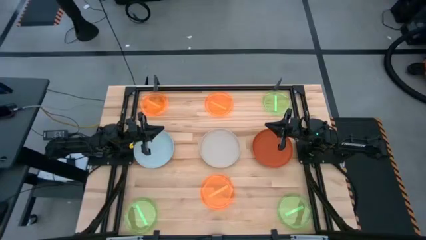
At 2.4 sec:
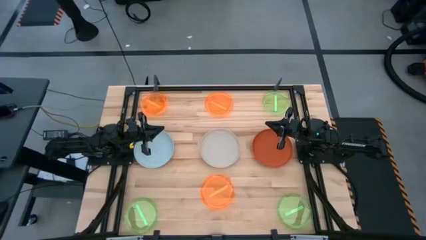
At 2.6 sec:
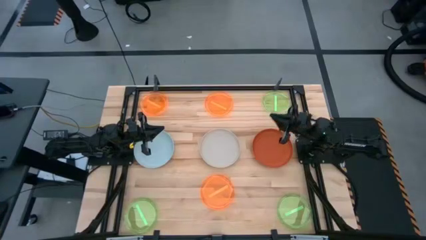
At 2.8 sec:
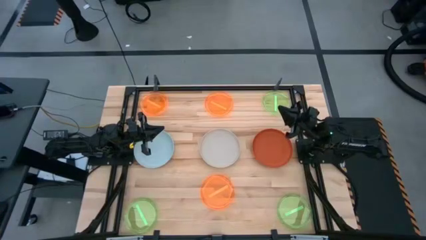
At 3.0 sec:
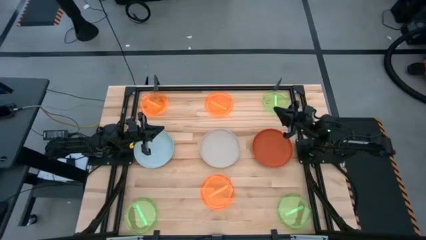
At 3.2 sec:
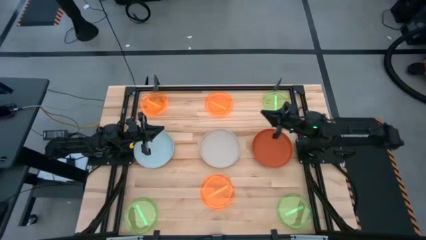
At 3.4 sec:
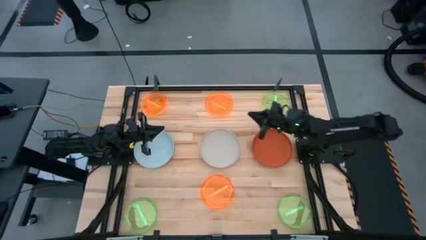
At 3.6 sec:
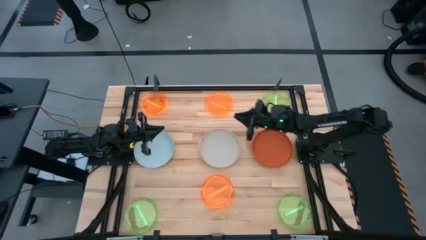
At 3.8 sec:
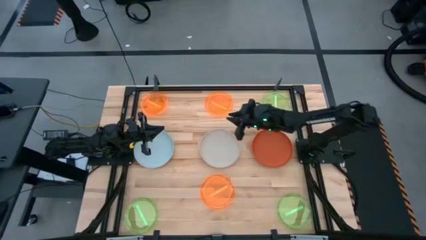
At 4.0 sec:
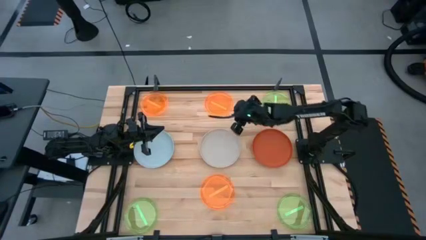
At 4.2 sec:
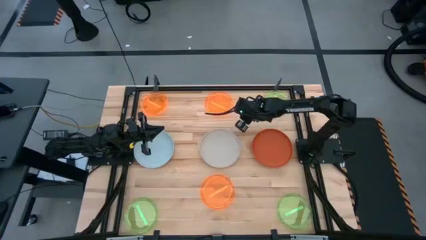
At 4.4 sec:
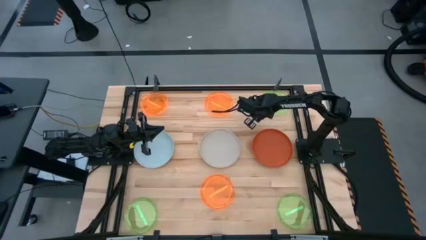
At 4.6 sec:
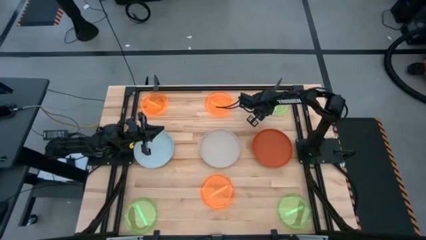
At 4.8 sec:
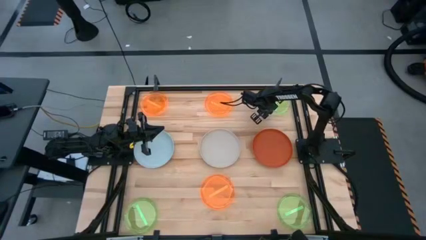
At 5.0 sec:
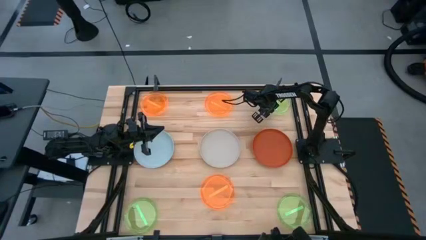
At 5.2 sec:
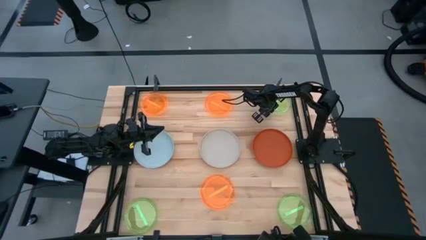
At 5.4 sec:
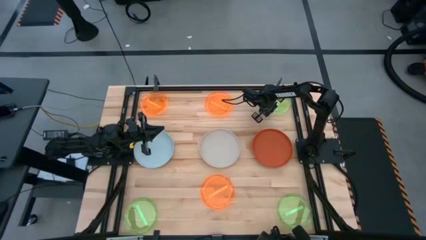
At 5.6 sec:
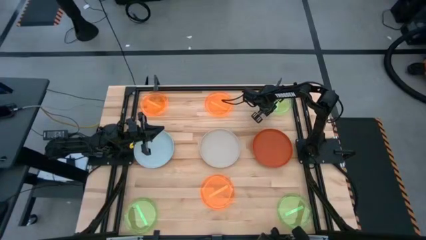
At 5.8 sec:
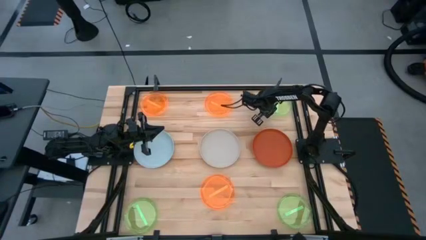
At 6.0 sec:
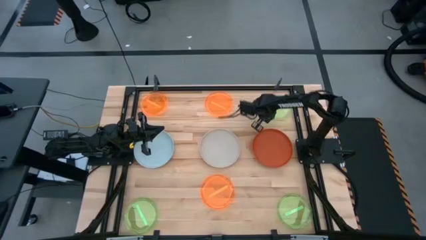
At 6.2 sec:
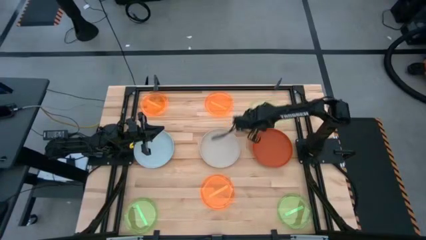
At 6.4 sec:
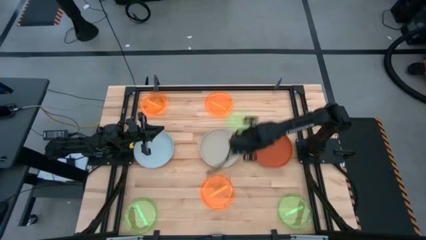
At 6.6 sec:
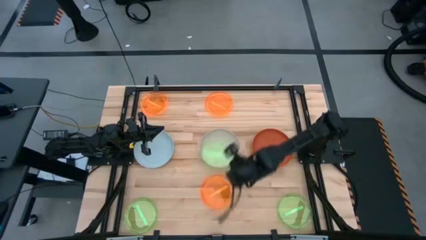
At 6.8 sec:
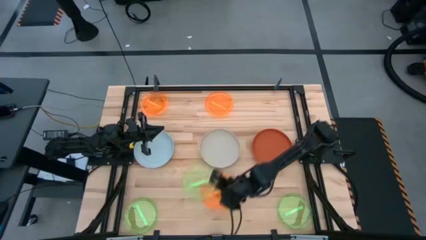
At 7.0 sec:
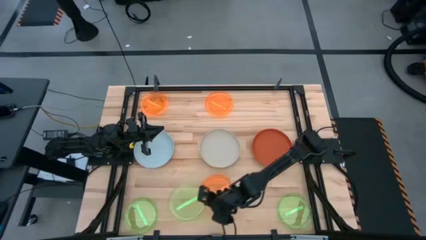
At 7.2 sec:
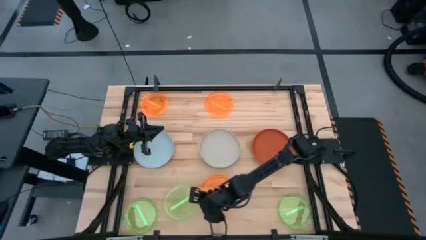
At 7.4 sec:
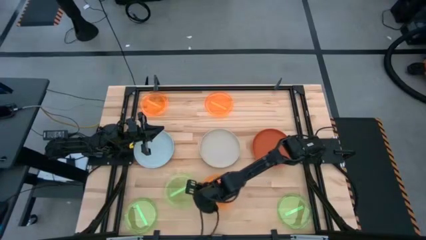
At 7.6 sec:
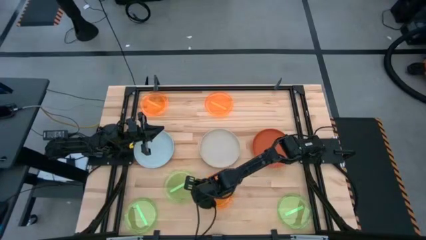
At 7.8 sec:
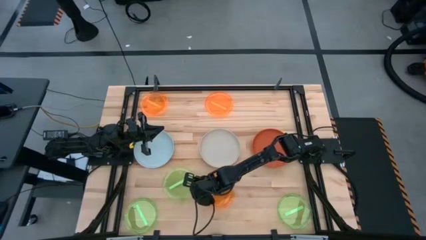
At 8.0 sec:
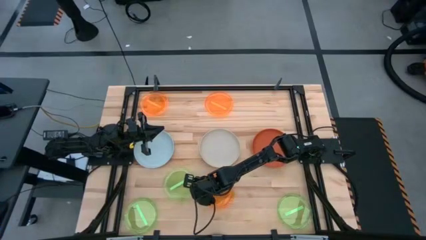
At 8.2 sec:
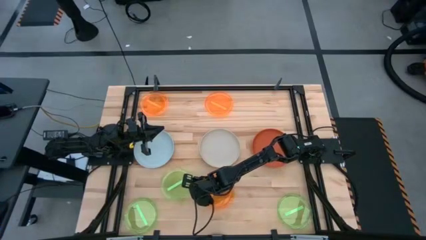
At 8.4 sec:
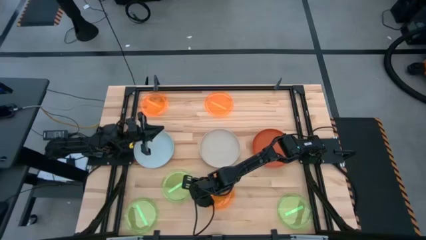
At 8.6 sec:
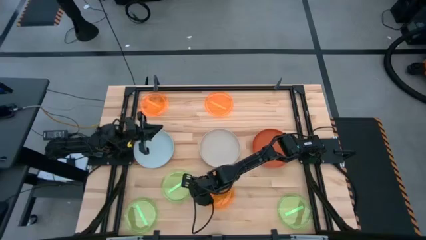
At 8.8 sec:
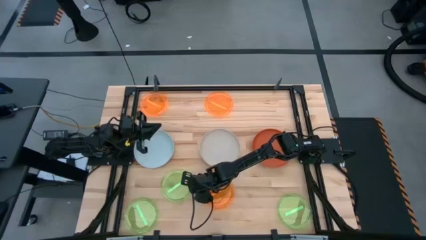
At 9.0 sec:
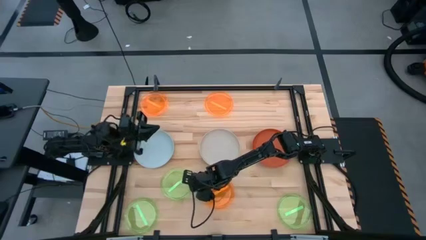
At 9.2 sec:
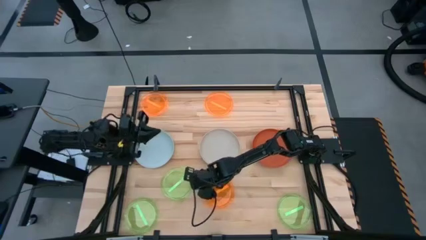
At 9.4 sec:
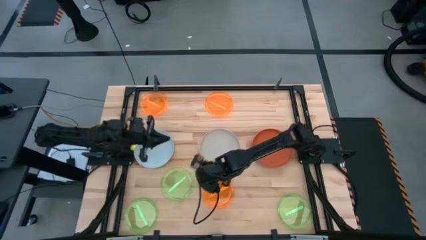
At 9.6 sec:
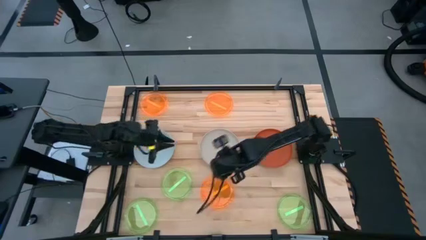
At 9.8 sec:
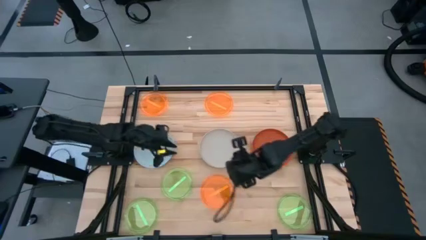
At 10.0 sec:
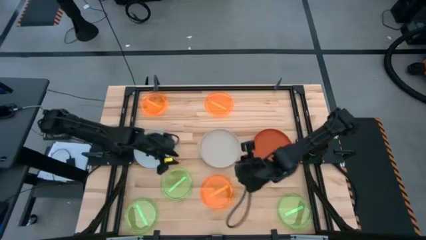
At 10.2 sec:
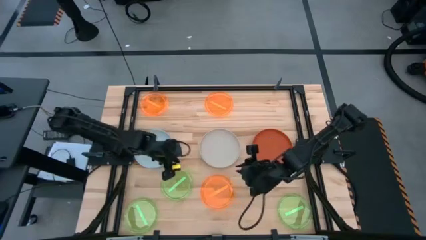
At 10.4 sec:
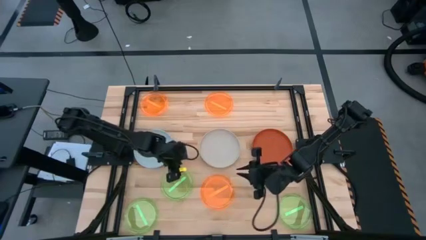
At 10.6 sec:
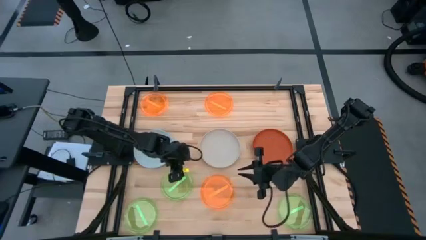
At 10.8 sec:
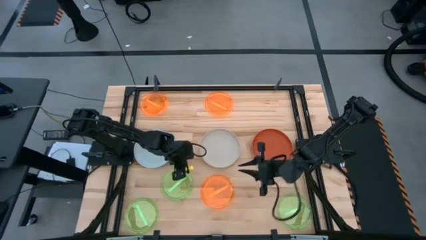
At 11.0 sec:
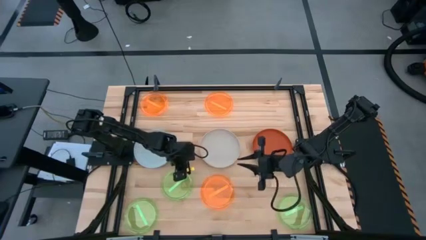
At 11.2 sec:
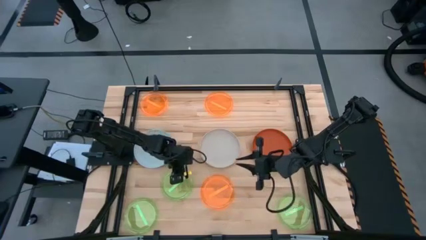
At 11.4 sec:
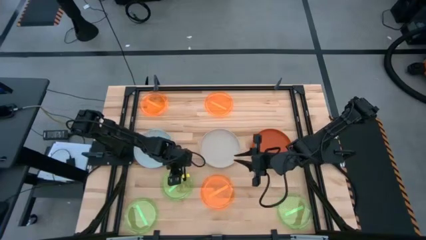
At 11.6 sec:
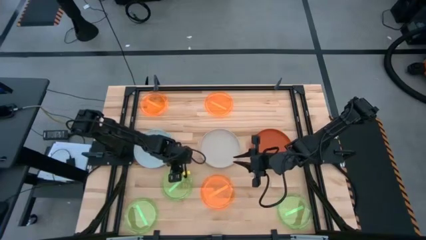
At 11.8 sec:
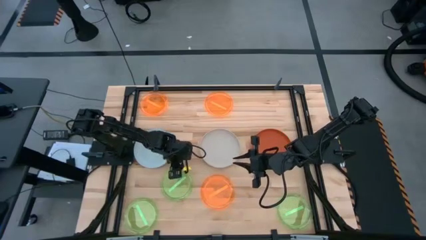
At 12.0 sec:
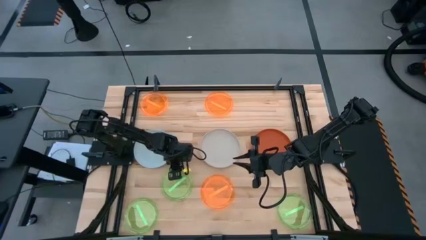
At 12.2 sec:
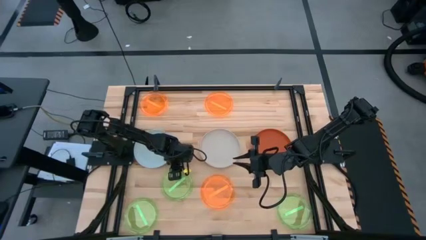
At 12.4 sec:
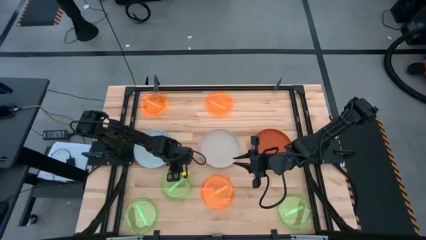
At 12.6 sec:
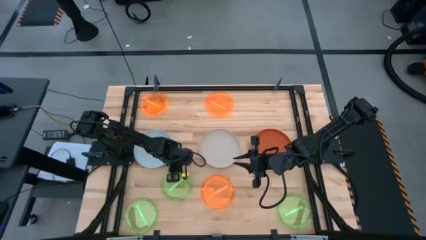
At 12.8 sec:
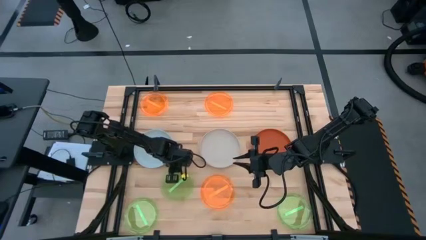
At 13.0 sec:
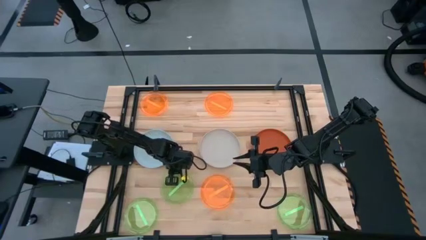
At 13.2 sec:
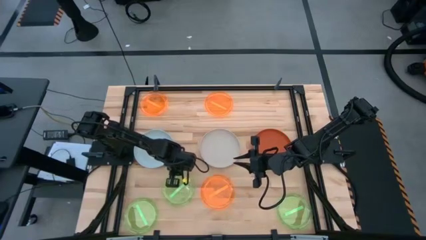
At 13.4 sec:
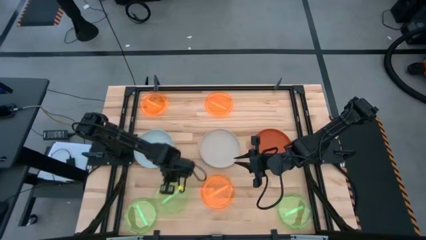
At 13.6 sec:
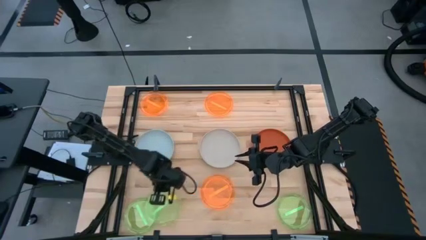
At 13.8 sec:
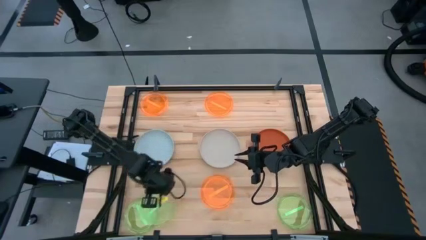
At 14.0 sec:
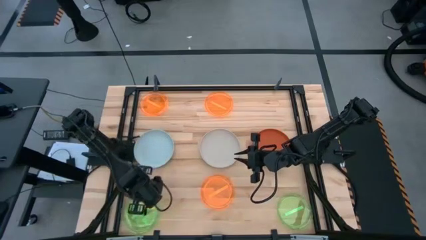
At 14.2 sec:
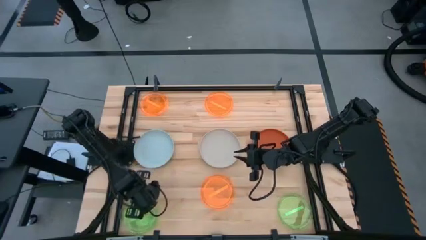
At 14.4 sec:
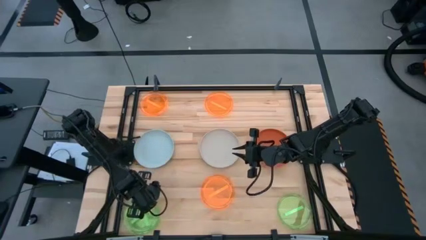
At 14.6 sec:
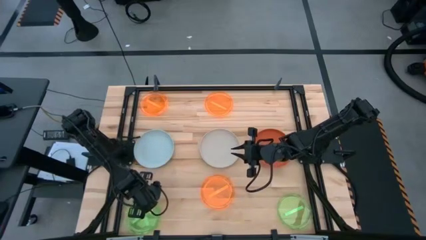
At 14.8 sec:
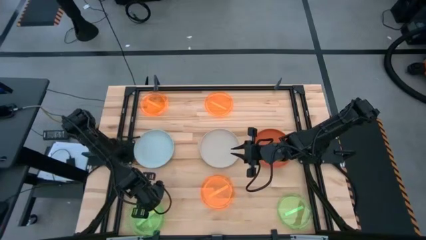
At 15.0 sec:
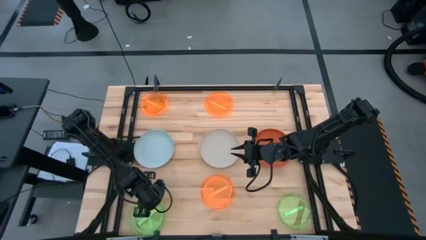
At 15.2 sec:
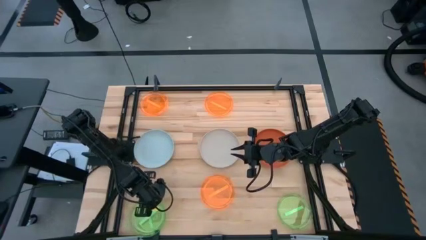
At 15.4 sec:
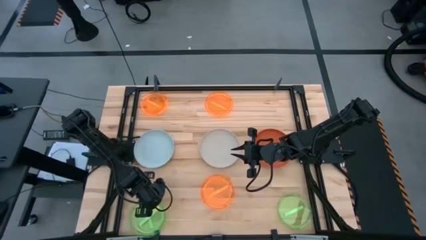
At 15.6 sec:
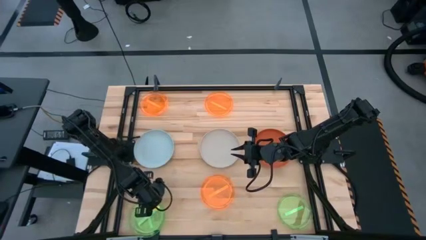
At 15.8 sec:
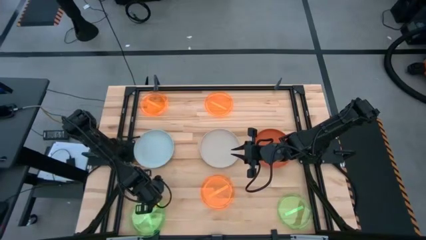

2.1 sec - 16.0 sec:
Task: Stack plastic plates
Stack the top right green plate on top of the bottom left green plate
